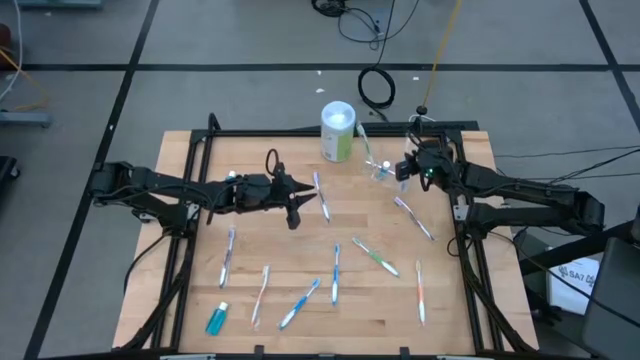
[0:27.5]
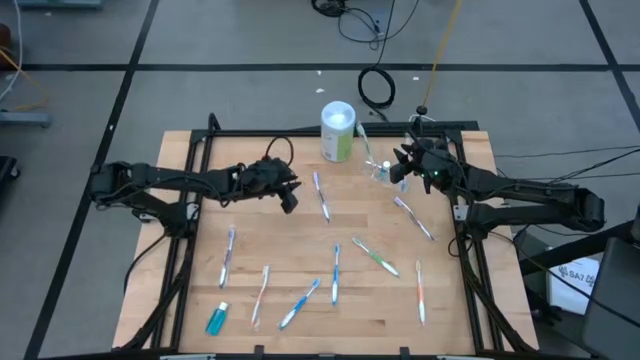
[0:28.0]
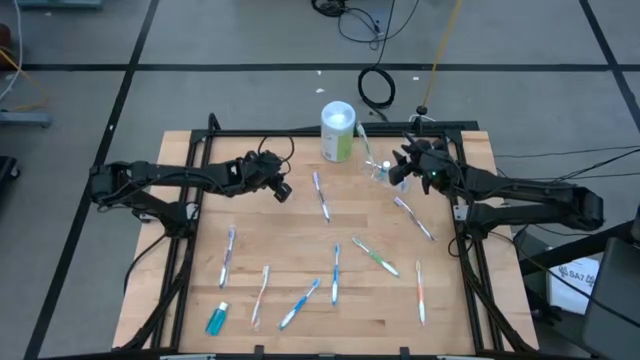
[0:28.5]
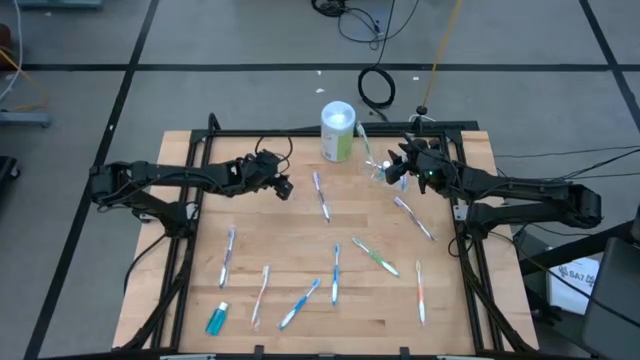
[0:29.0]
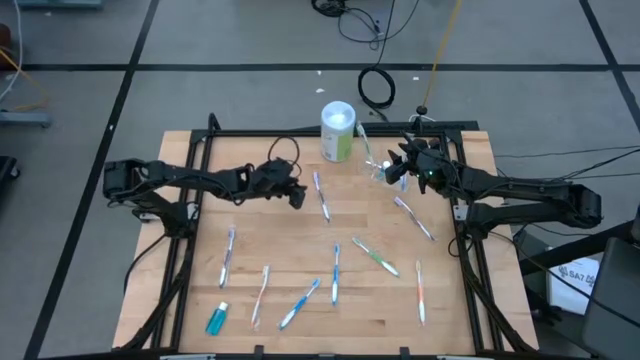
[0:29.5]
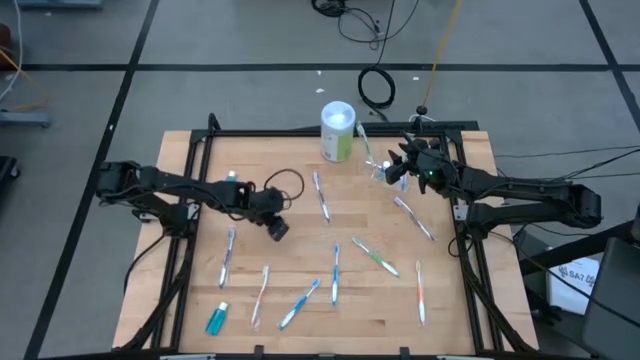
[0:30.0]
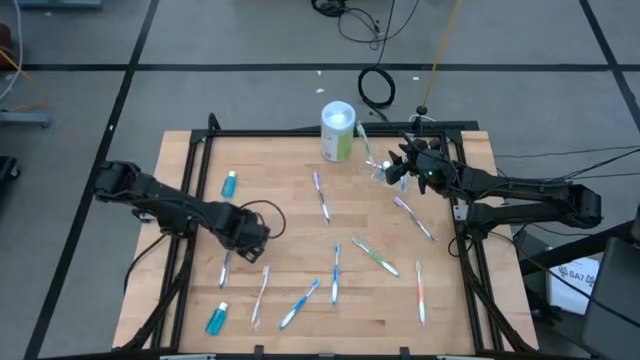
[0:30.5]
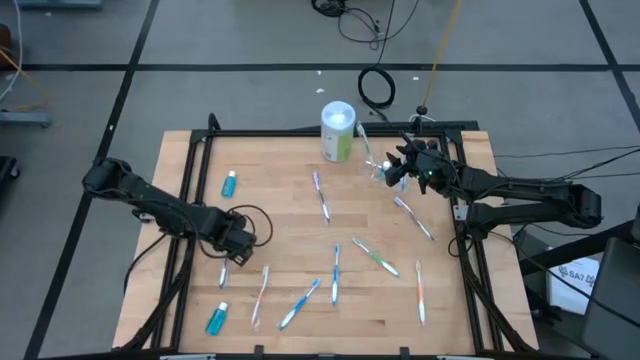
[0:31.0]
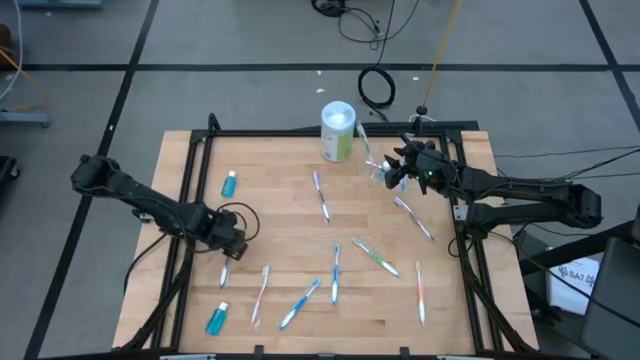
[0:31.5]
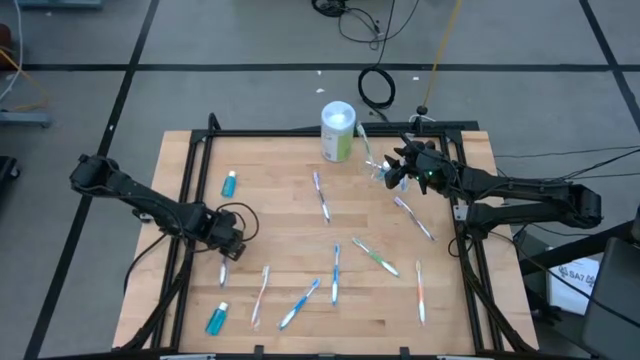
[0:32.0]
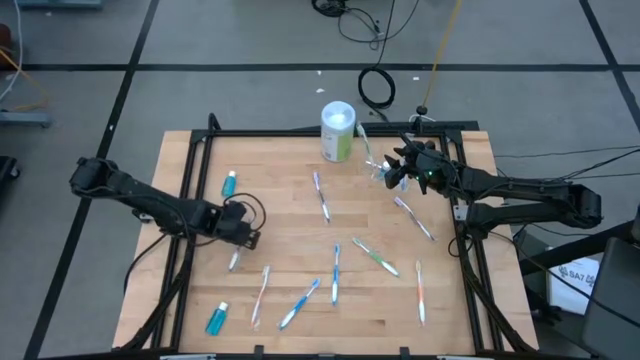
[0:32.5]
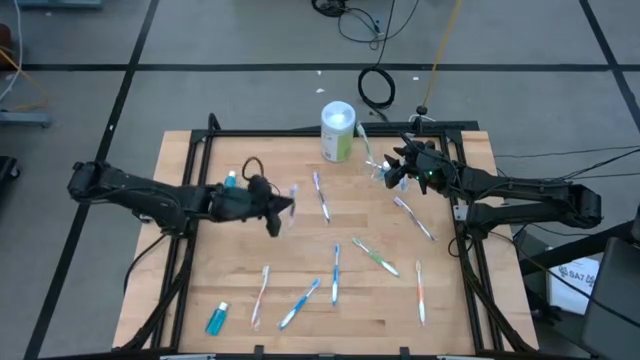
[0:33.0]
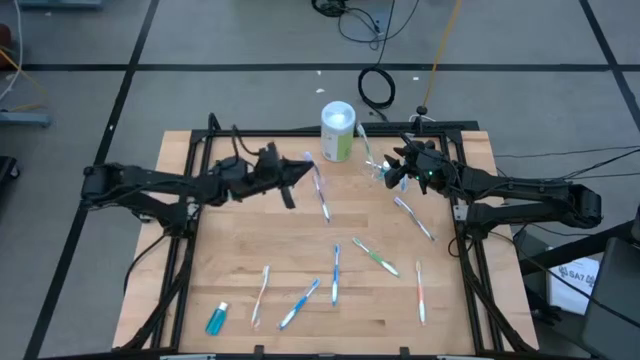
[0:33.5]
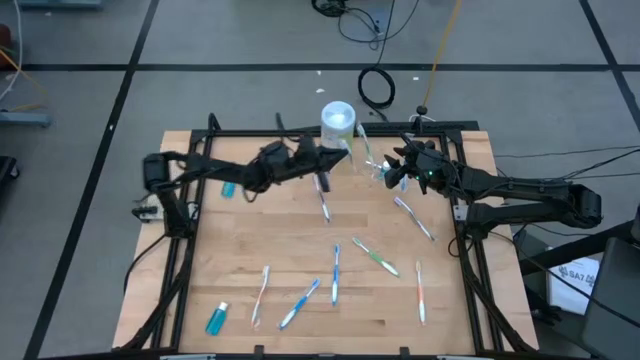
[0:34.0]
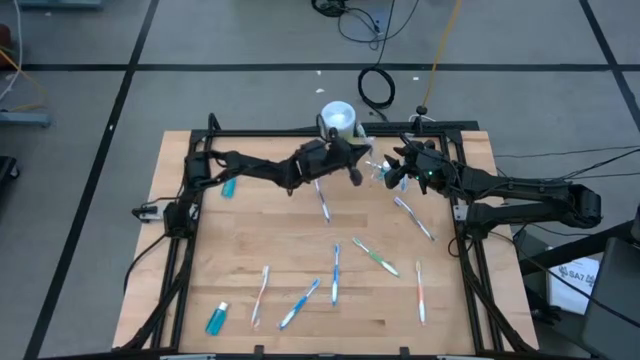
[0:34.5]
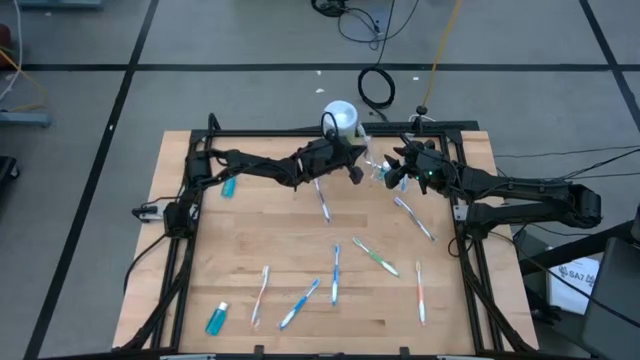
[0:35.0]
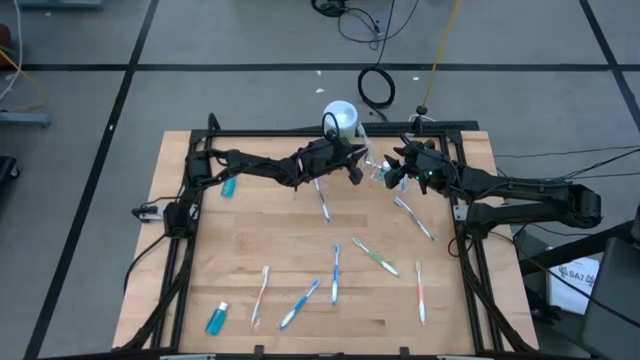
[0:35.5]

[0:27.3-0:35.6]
Task: Pick & Place toothbrushing station
Put the bottom purple toothbrush into the transparent organizer

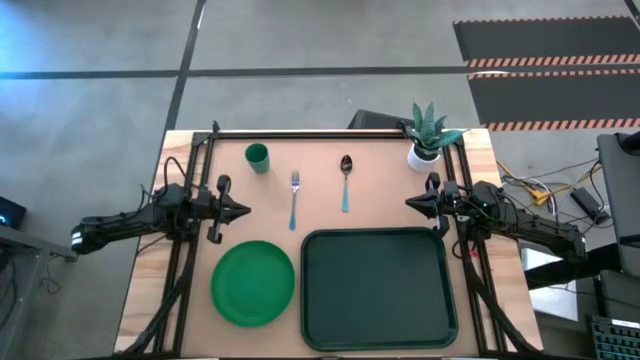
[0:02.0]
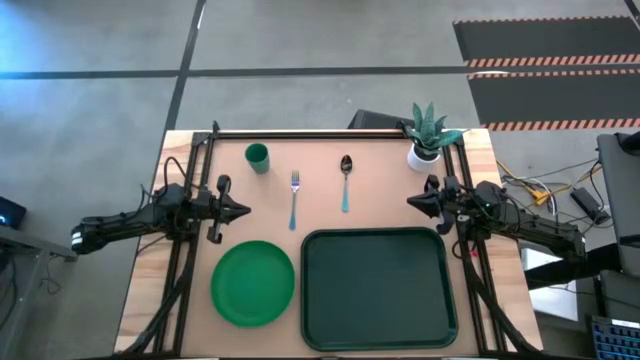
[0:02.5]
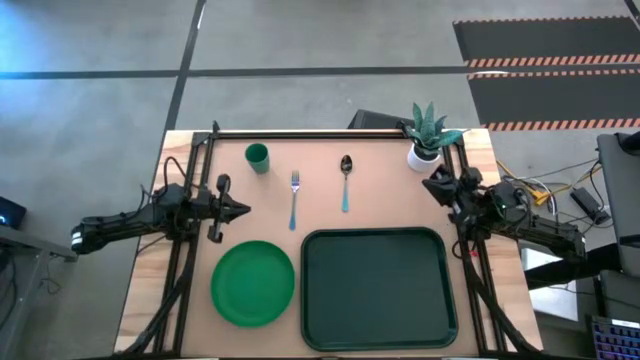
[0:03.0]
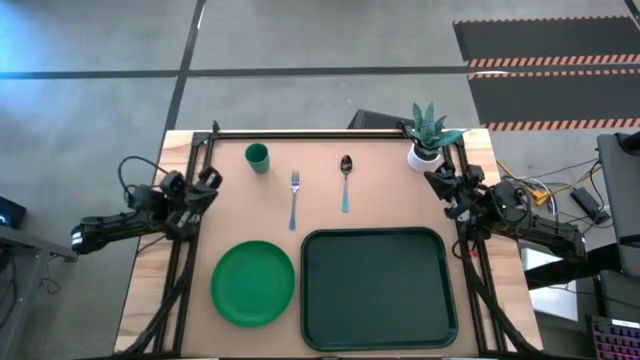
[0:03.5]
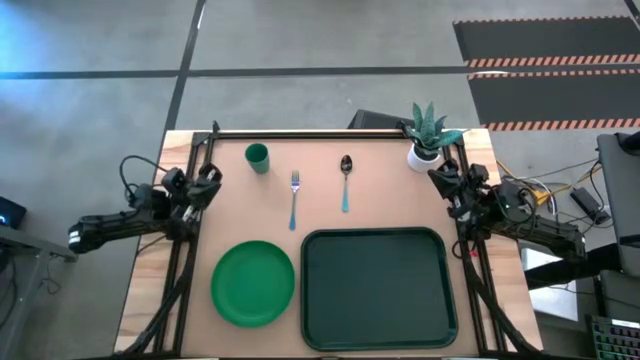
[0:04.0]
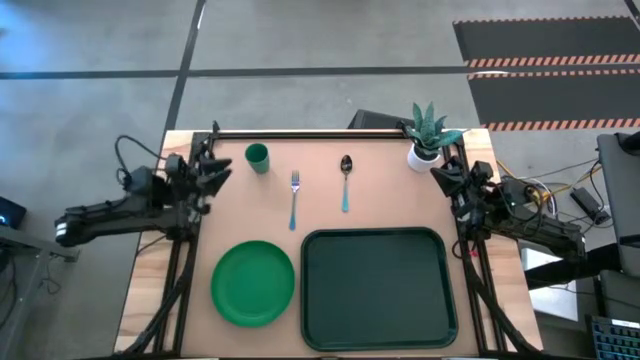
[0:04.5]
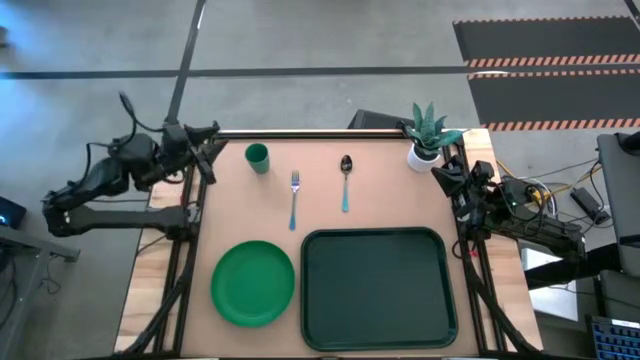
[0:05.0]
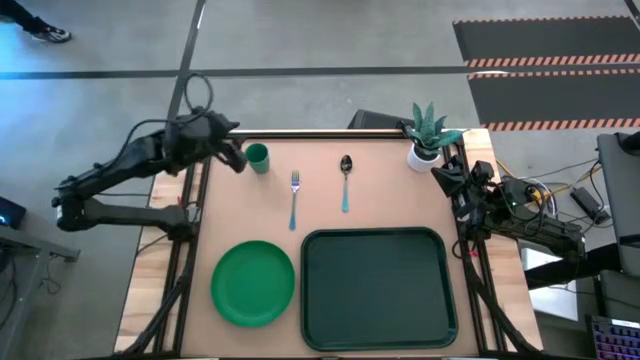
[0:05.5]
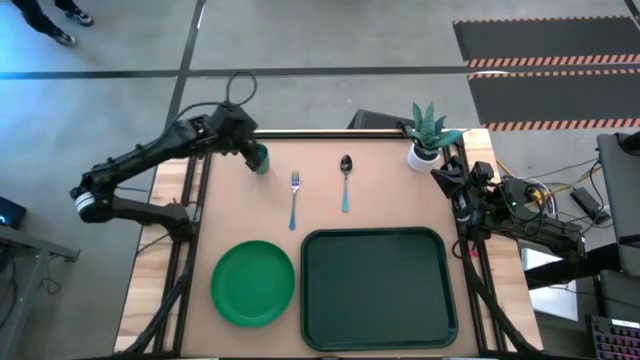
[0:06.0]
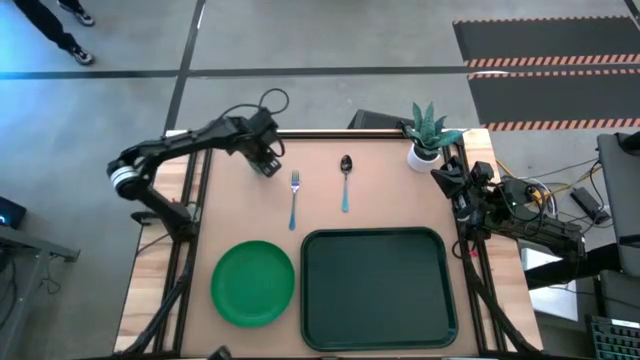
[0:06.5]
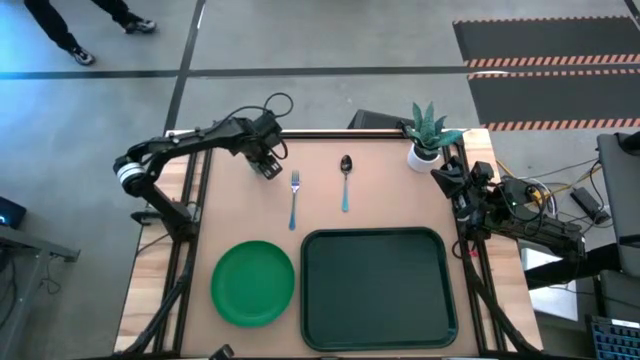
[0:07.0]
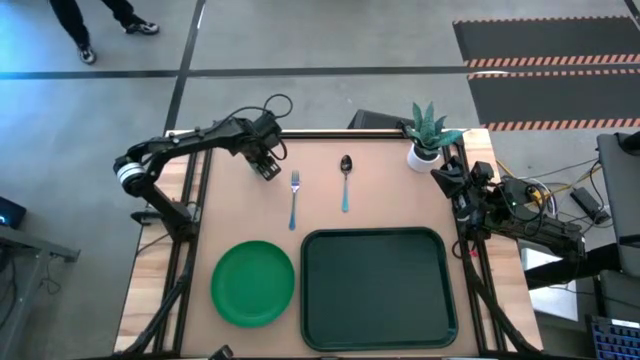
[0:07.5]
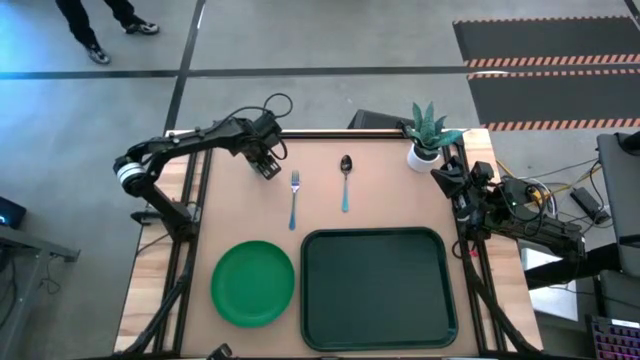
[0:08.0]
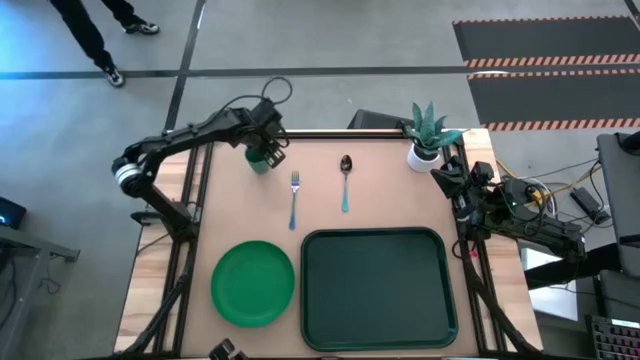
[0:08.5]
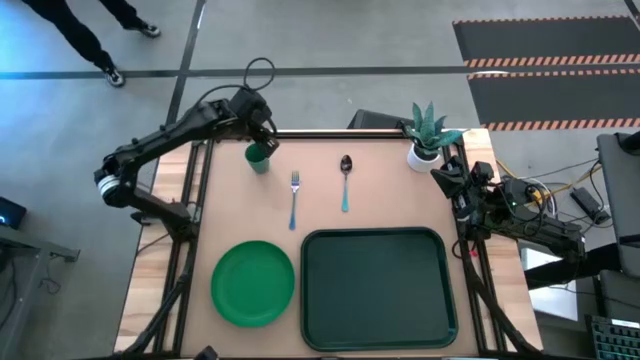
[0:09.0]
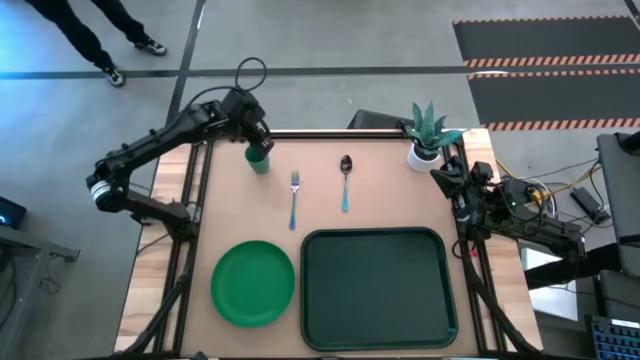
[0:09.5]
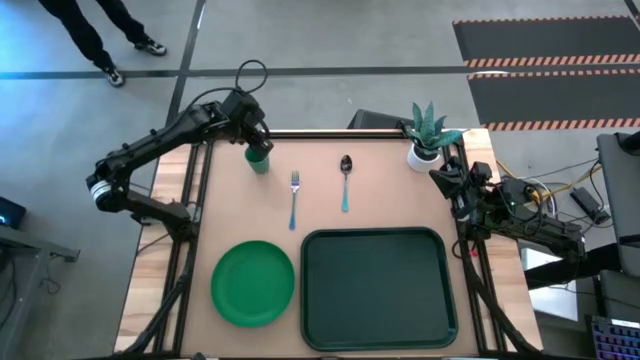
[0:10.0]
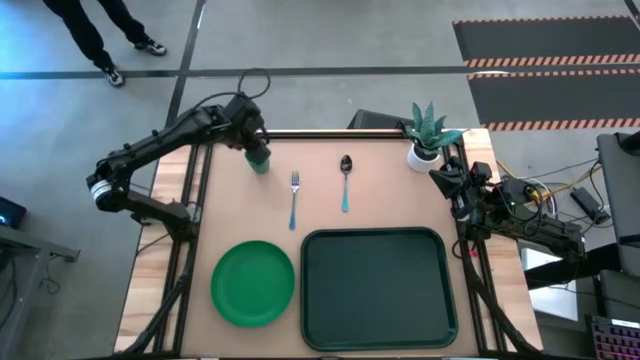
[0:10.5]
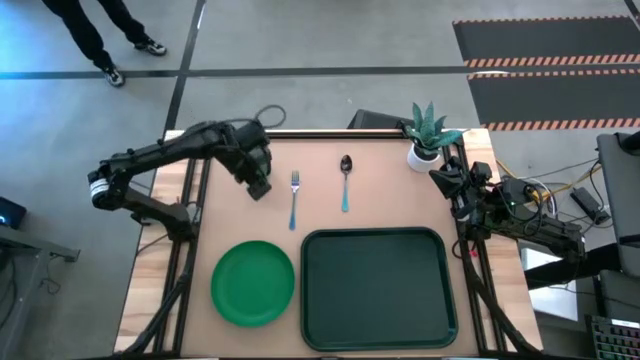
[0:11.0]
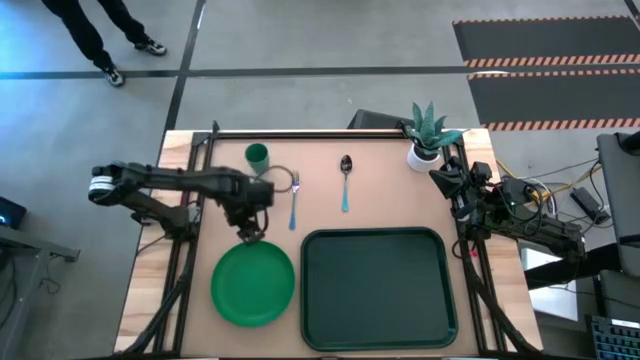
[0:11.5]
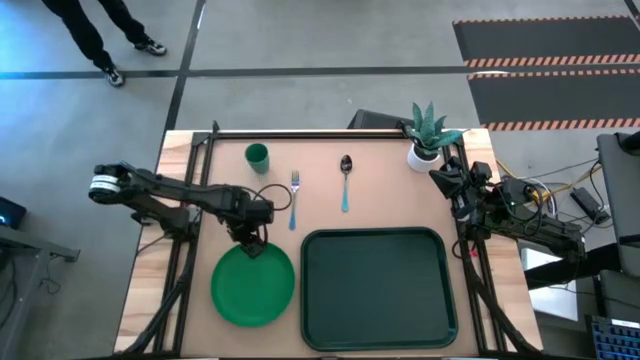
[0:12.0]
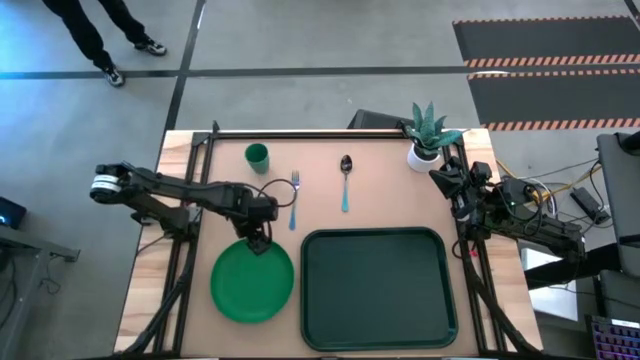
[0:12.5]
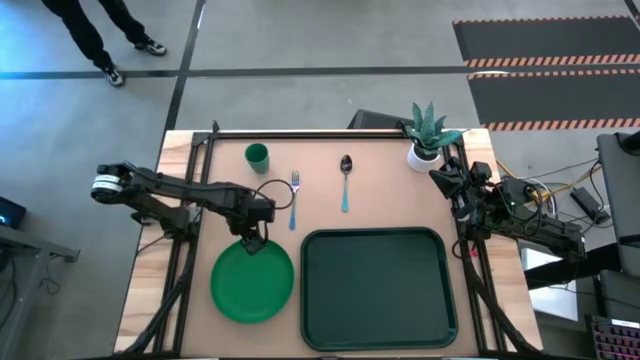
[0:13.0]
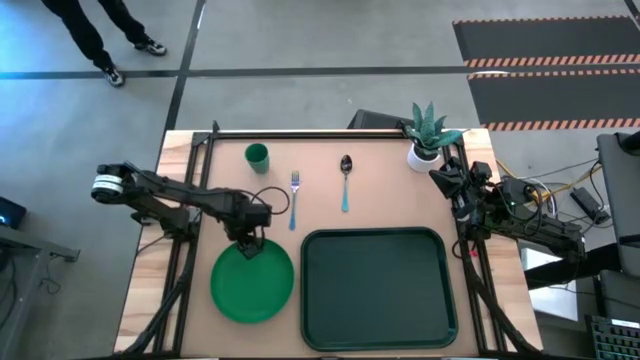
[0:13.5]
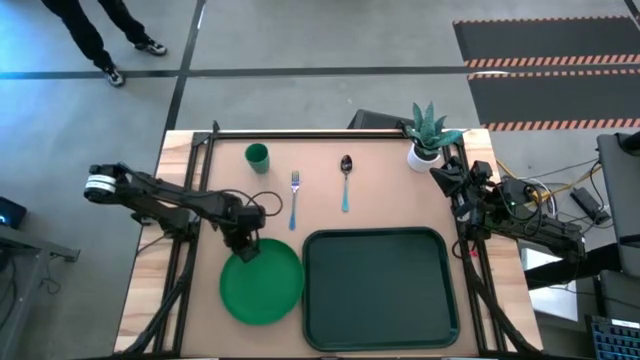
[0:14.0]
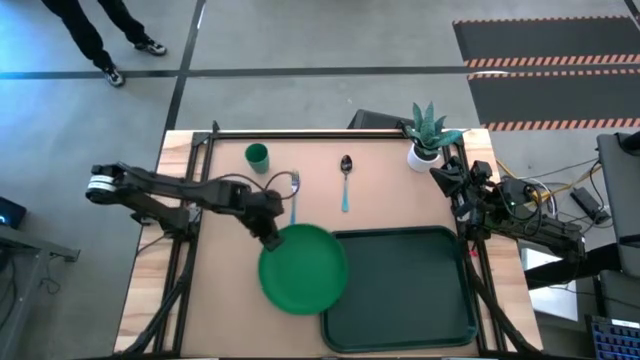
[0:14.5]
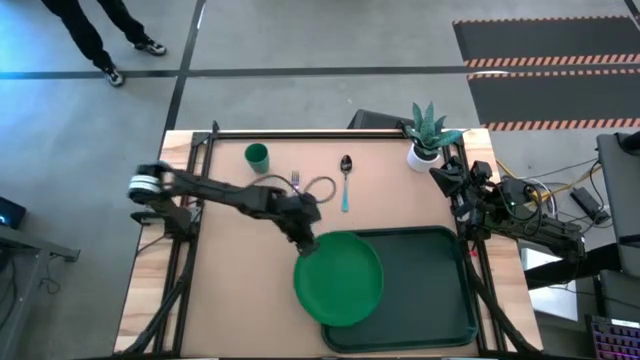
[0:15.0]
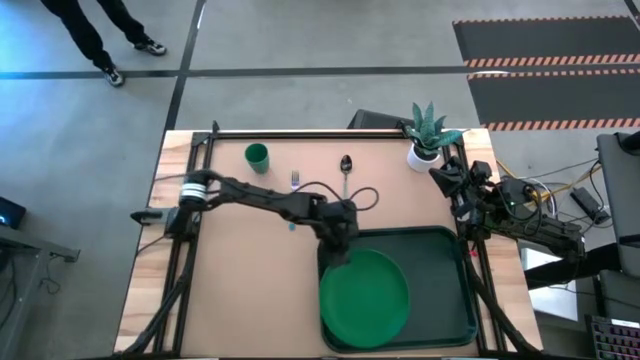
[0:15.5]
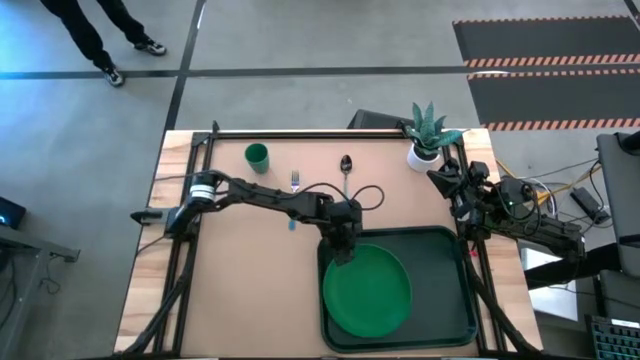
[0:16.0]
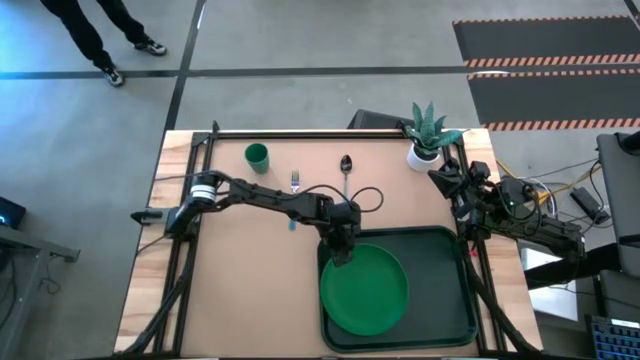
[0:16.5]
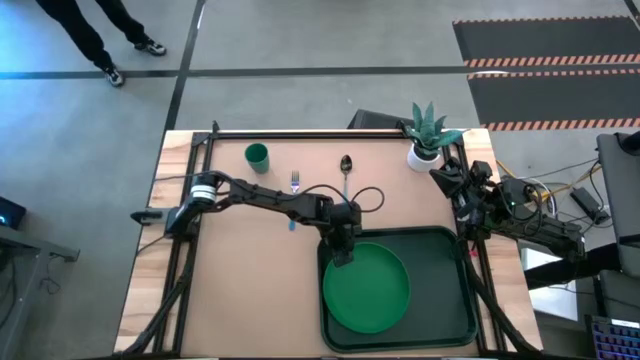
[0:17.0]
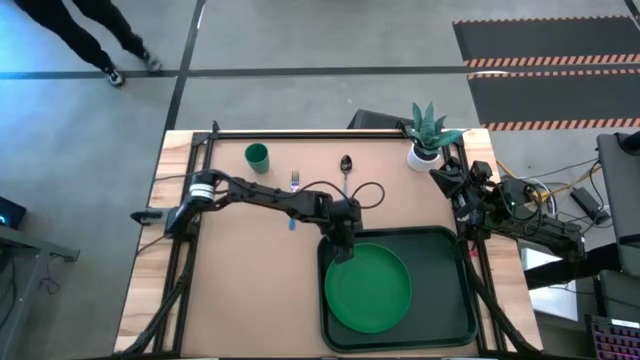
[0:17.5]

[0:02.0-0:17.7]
Task: Pick and place plate/cup/fork/spoon on tray
Put the green plate on the green tray
